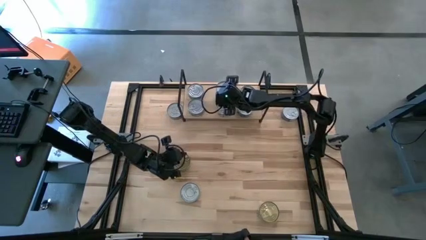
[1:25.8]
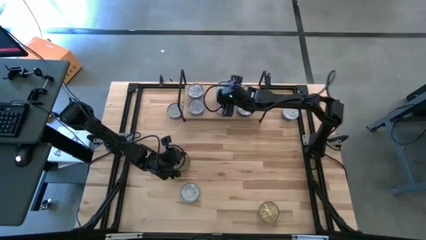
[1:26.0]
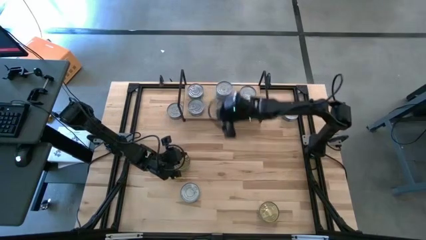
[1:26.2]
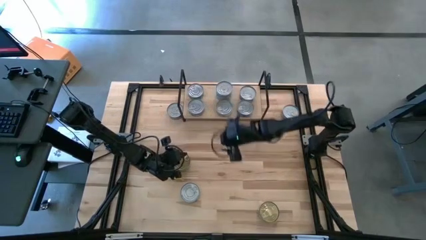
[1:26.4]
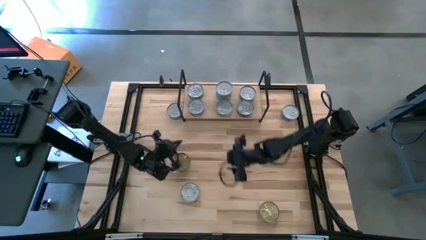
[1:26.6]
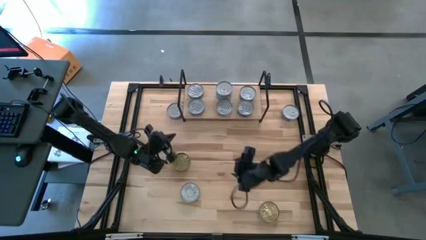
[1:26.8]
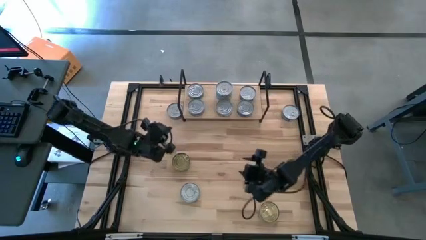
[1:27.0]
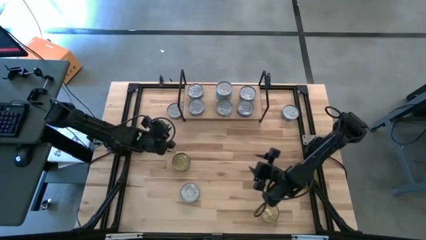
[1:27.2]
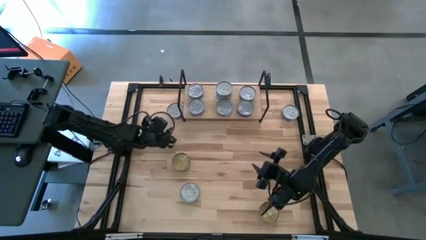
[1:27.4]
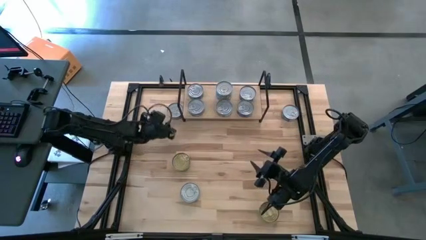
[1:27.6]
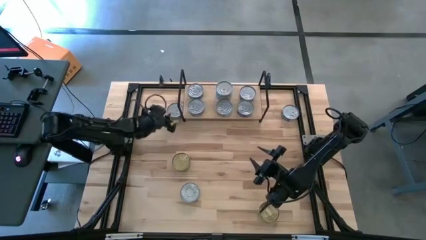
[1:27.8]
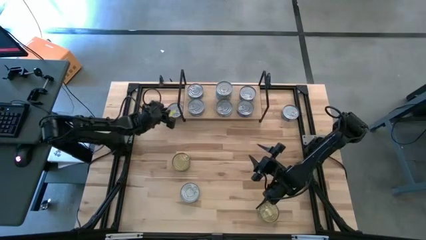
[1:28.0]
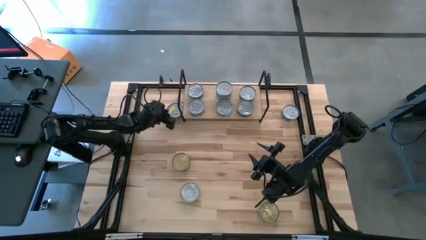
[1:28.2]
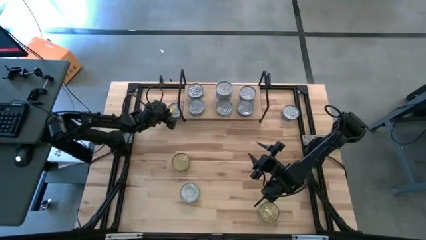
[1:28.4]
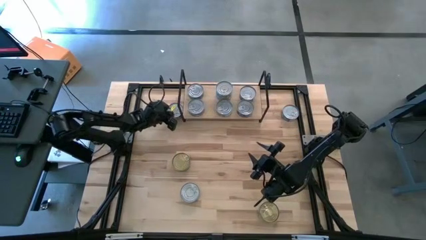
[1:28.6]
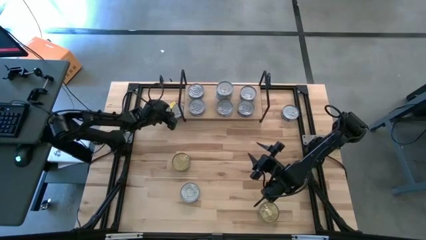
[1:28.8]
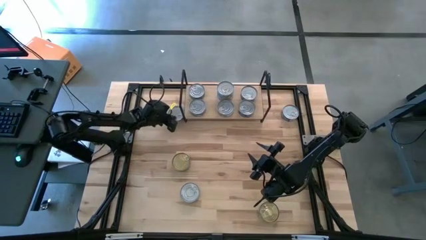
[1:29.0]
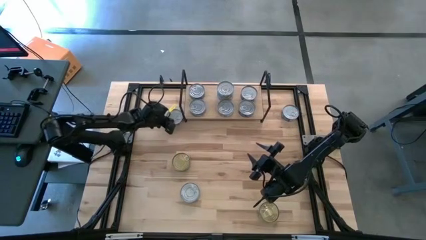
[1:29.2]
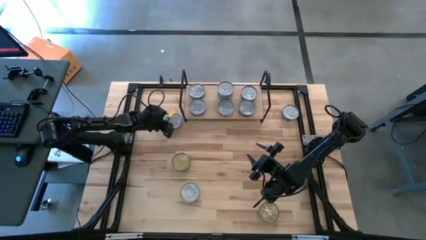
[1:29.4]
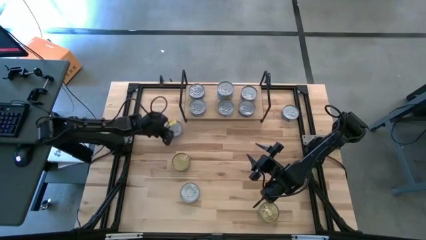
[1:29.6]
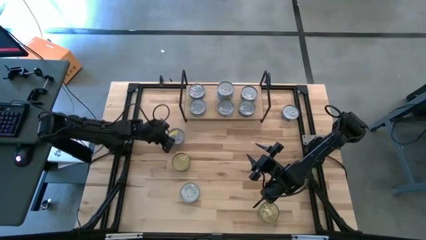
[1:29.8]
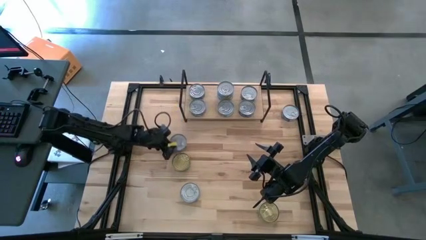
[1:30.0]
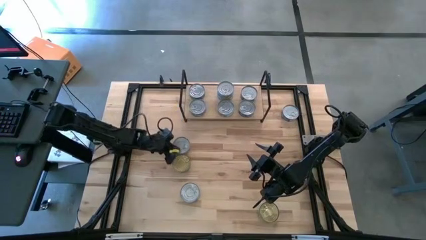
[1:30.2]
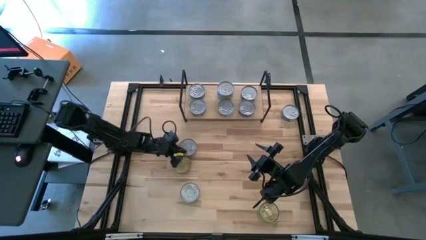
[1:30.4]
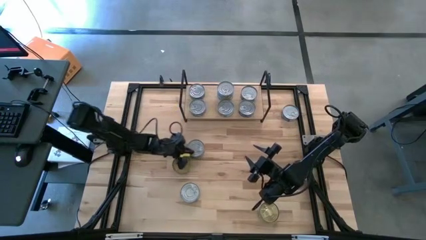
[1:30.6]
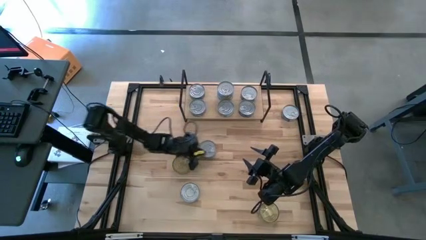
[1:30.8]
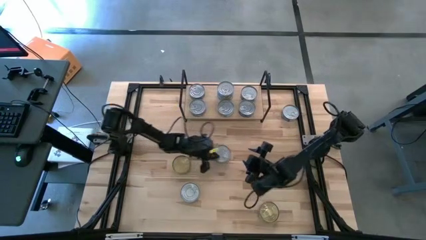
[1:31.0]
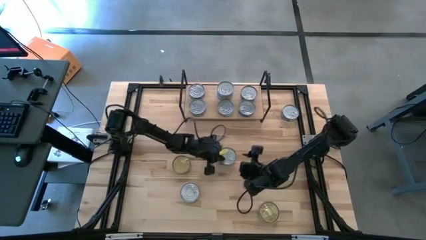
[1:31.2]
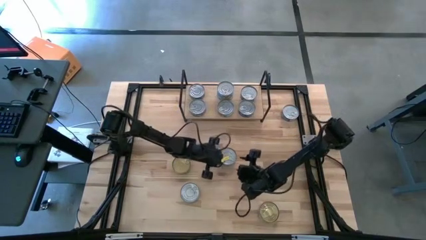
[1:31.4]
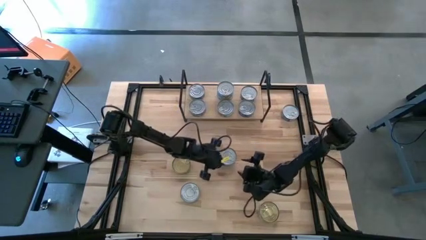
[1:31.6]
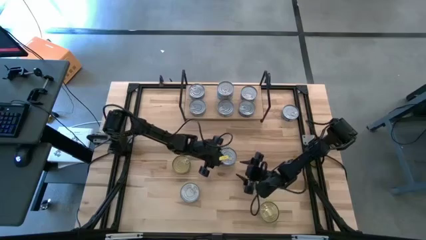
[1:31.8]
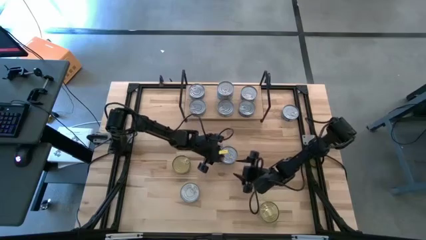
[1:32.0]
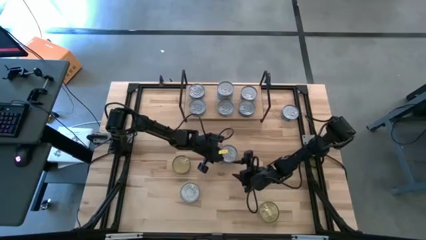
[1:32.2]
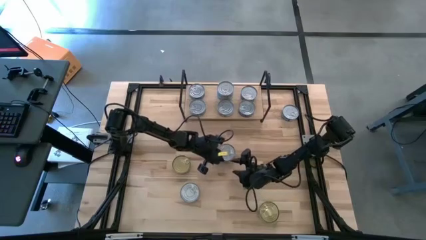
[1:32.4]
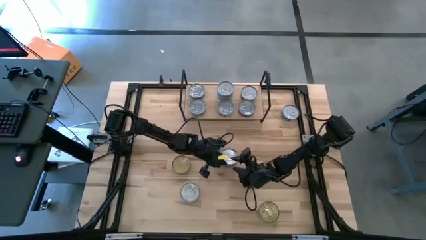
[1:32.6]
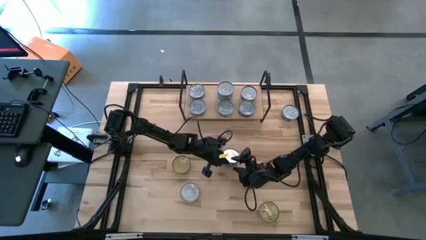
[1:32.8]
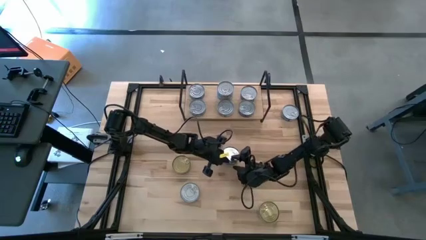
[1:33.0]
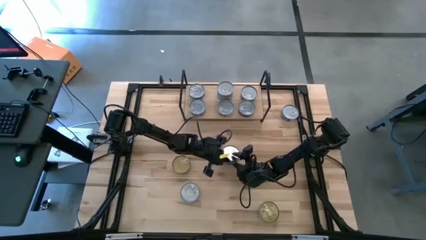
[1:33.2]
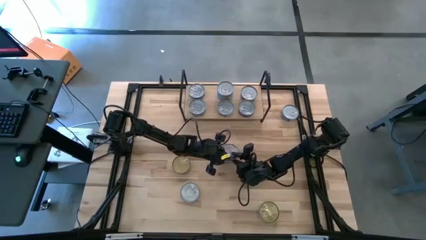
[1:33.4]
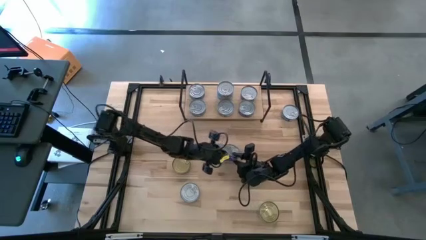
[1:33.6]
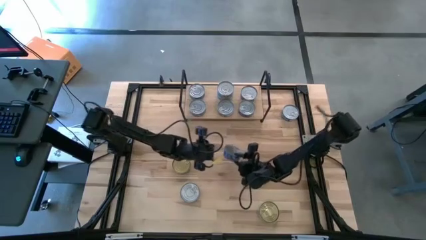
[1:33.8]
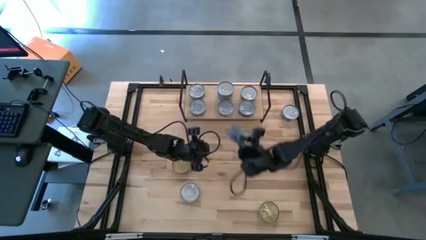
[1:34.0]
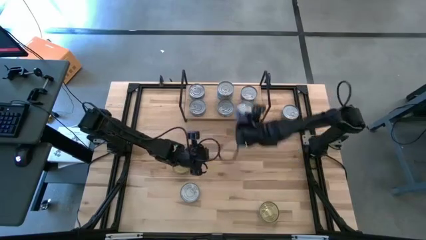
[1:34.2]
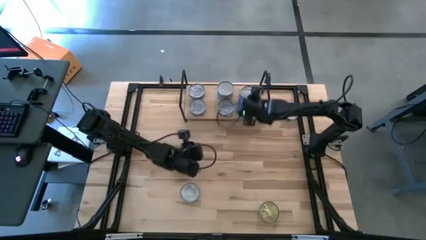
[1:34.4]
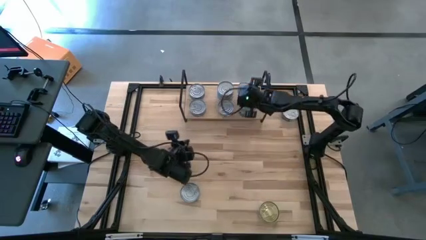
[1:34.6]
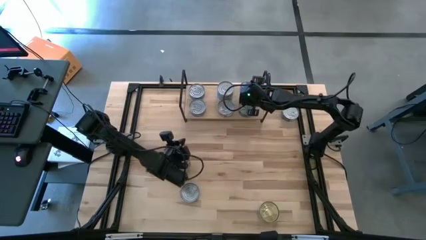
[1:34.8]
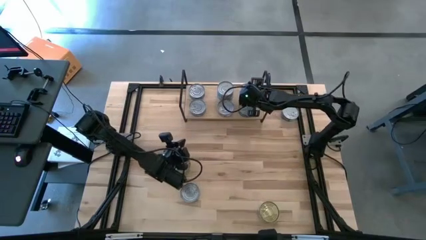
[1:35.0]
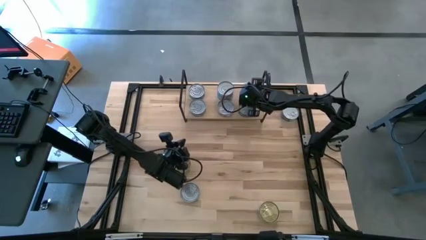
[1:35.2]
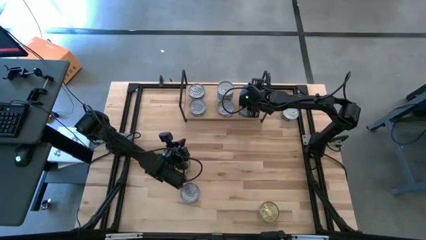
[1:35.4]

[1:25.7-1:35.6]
Task: Stack canned seafood by type on shelf
Stack the blue tuna can on top of the other blue tuna can on the shelf
